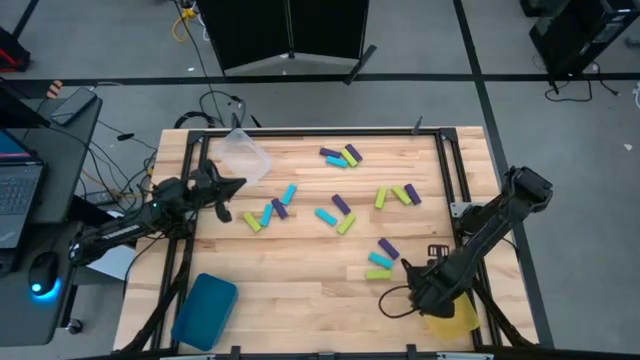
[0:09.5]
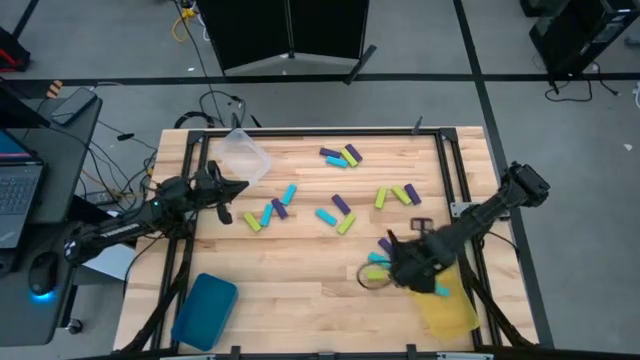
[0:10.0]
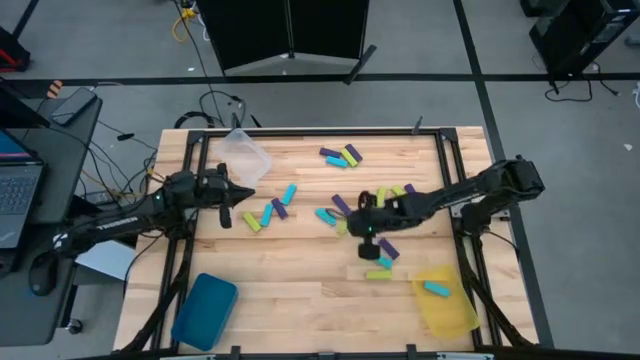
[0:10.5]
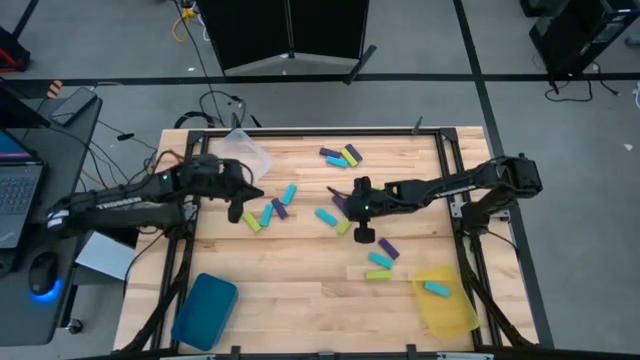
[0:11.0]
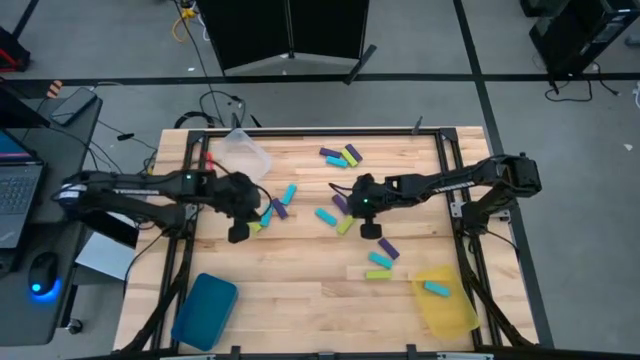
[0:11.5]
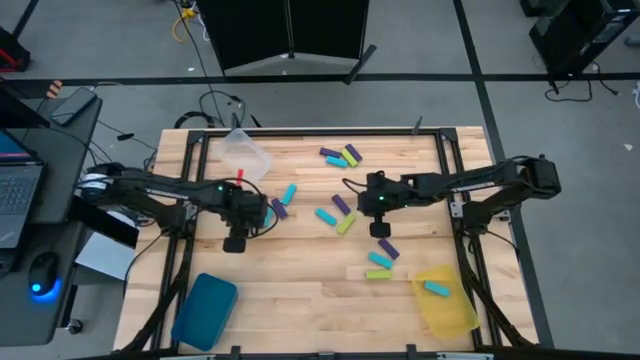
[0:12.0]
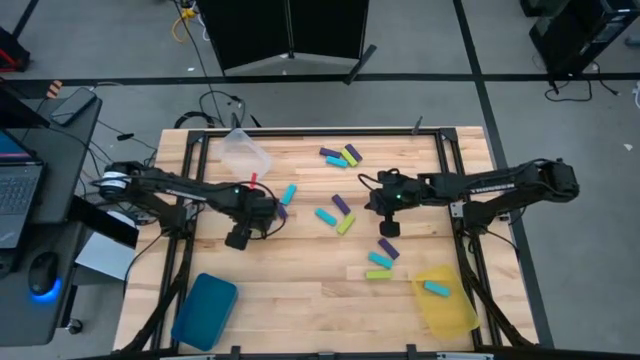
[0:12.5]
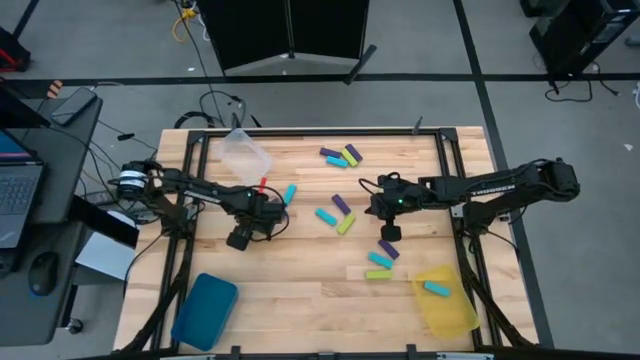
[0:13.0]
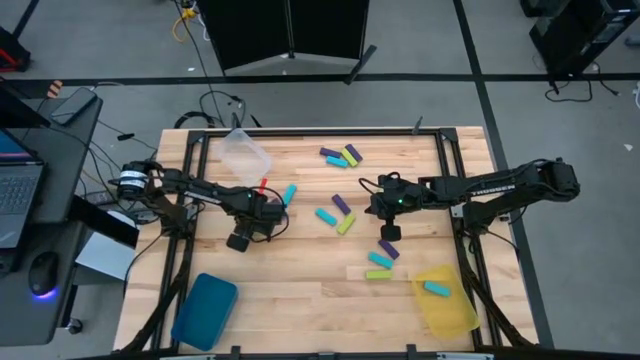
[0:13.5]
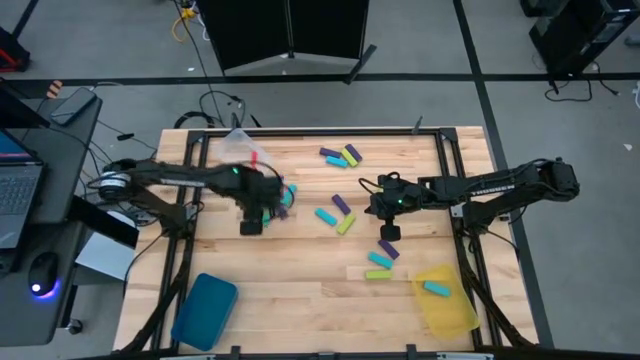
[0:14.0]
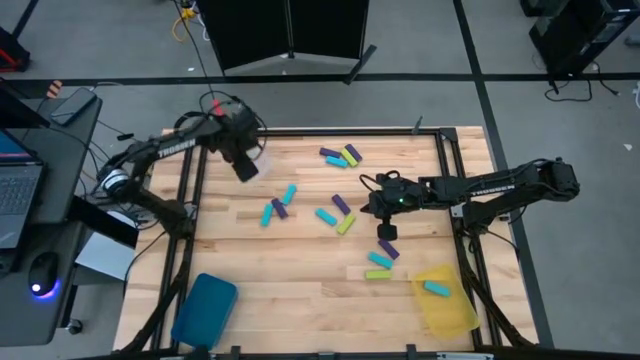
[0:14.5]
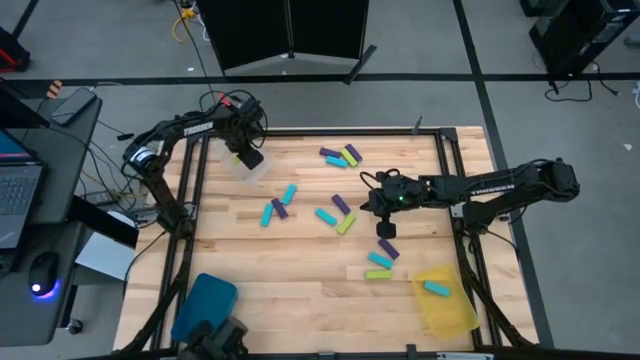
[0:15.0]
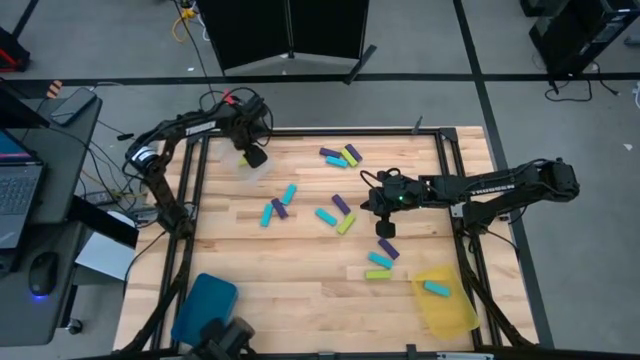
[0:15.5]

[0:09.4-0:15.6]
Task: Sort blocks
Put the green block into the transparent bin

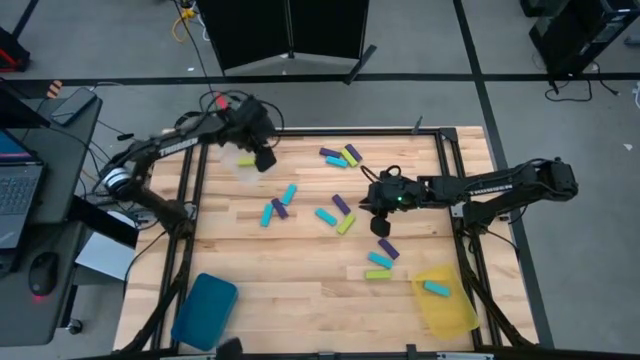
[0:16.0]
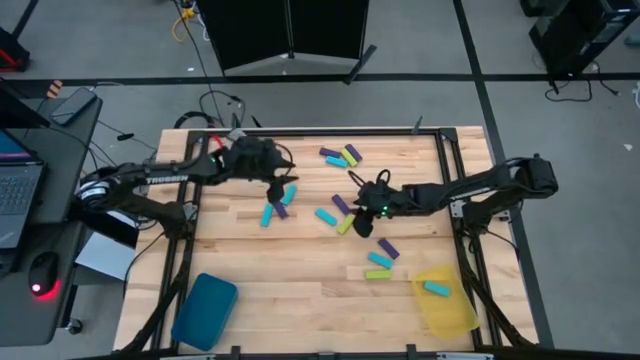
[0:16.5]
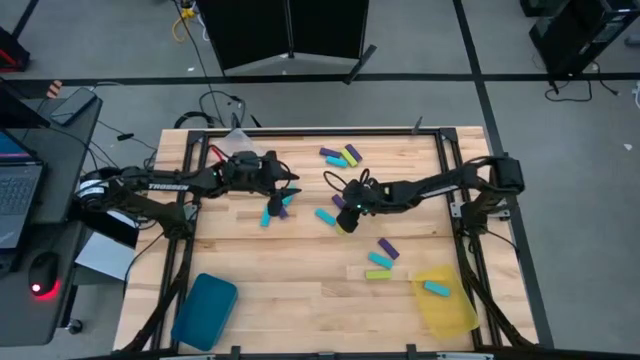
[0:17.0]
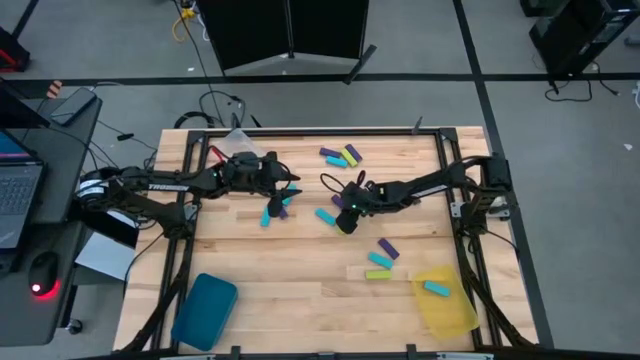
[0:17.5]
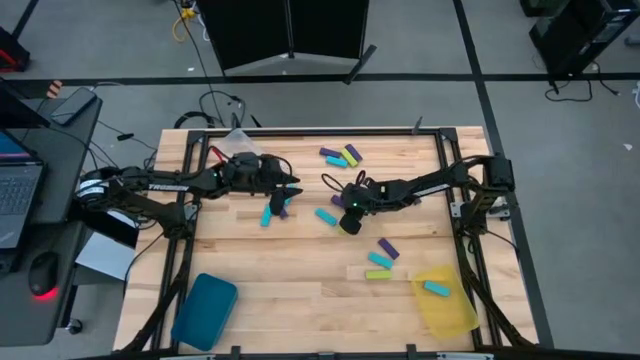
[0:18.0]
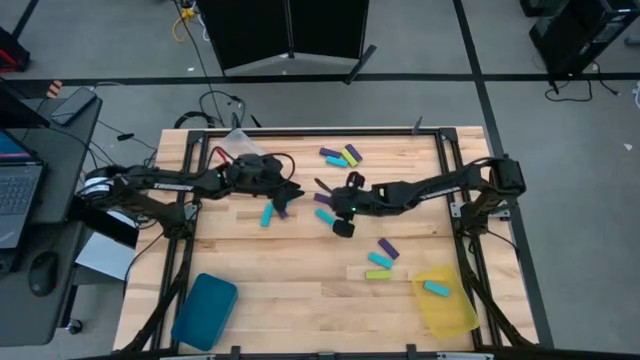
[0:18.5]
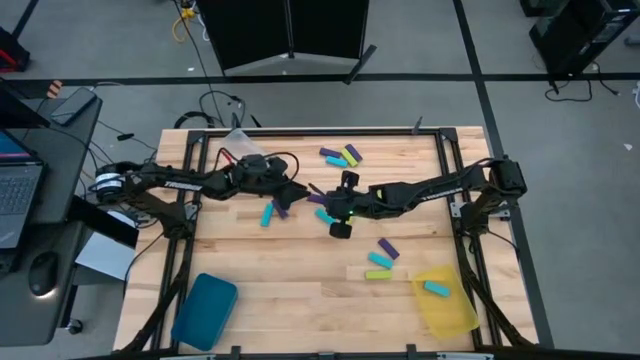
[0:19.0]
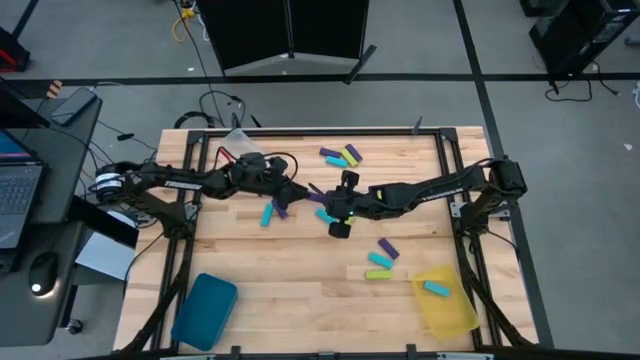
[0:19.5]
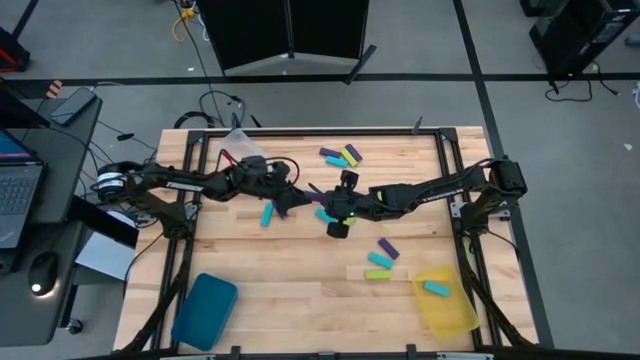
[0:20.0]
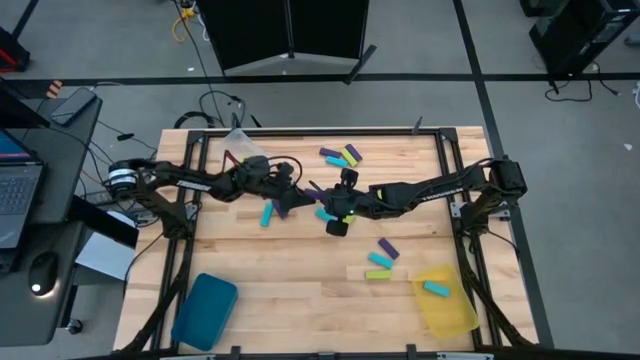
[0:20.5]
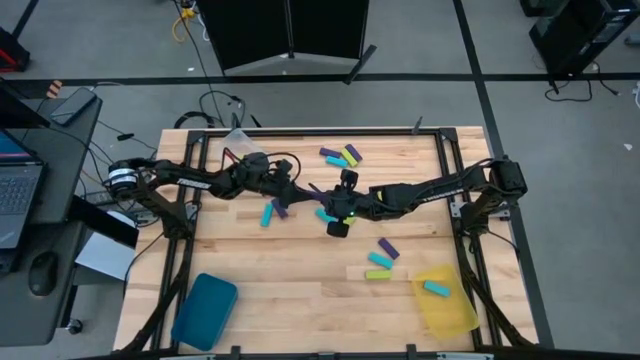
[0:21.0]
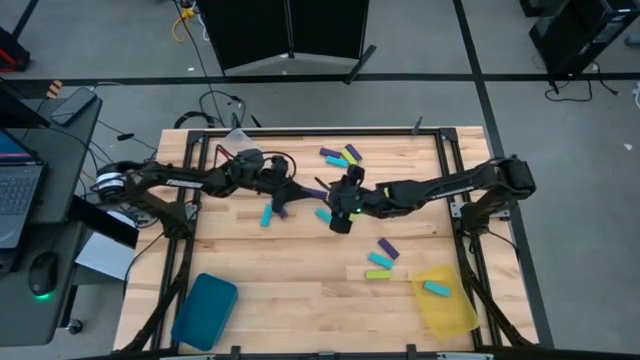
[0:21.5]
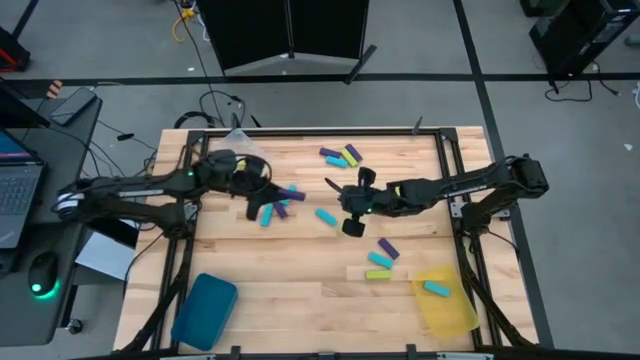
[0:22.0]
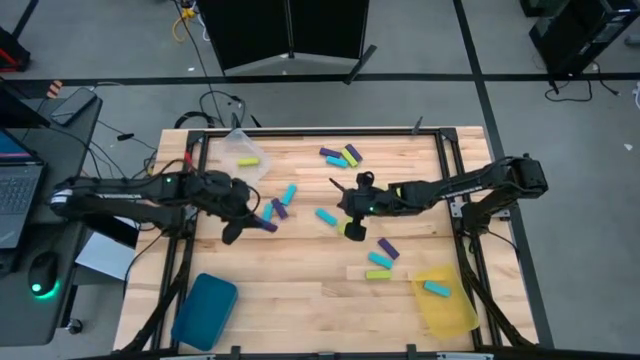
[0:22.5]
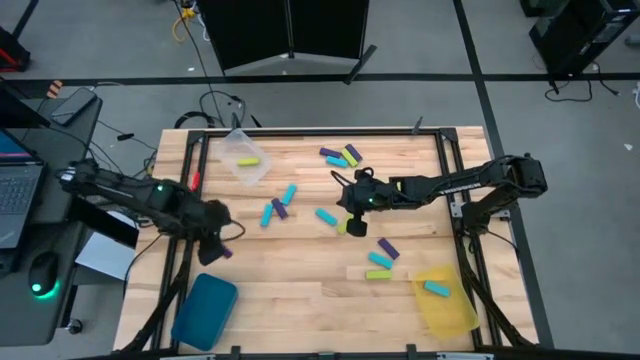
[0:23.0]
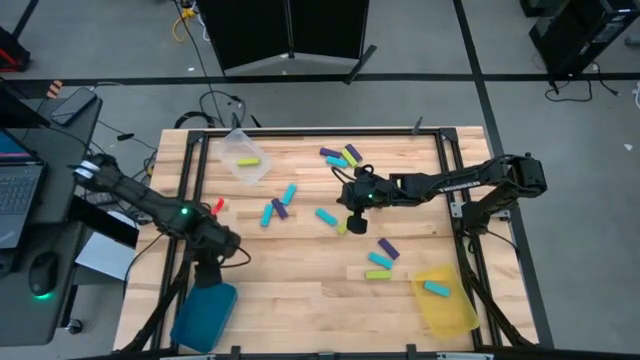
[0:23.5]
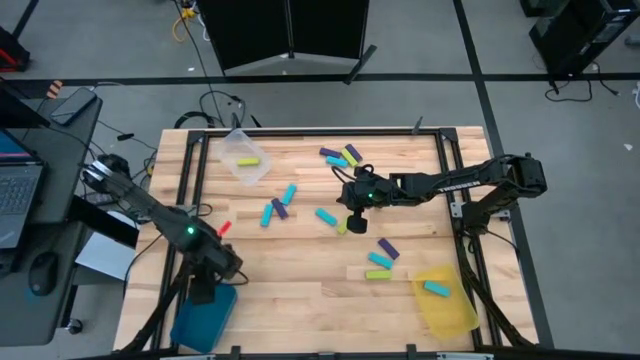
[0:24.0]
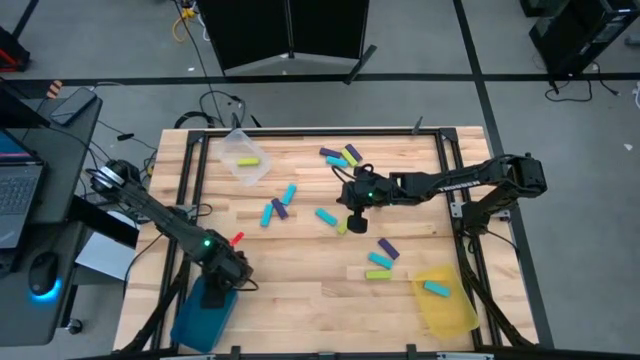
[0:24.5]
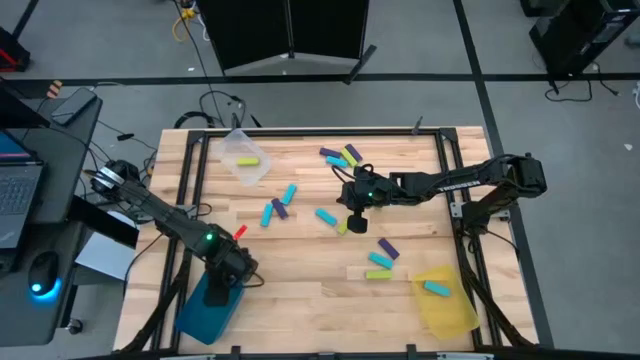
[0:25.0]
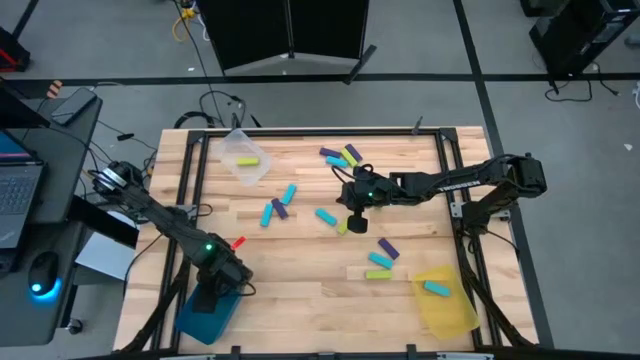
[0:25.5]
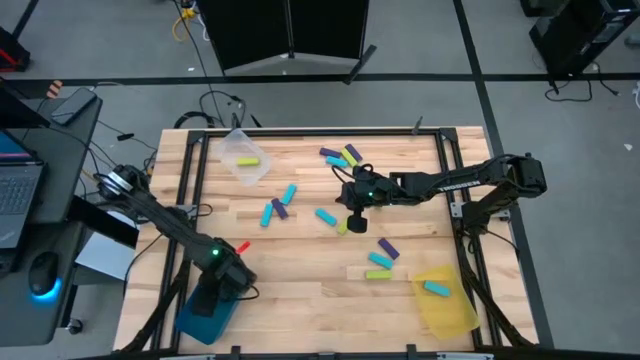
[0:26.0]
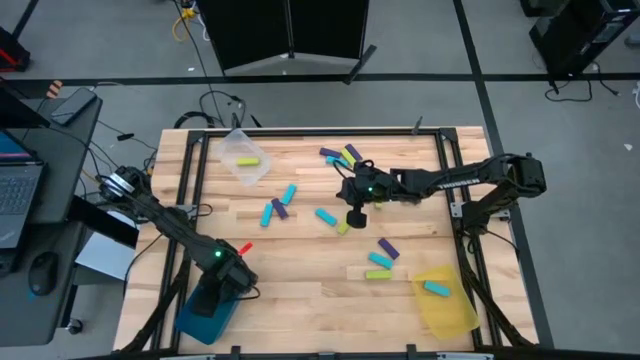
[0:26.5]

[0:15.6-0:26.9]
Put the purple block into the blue bin

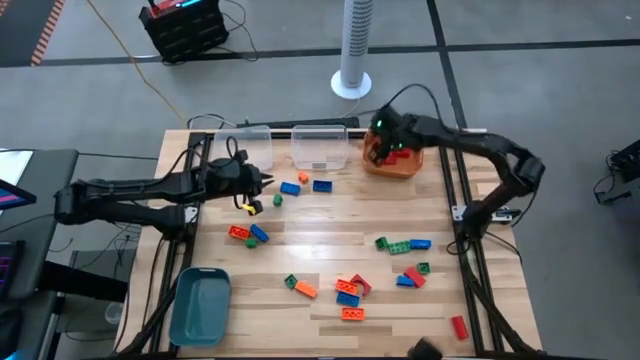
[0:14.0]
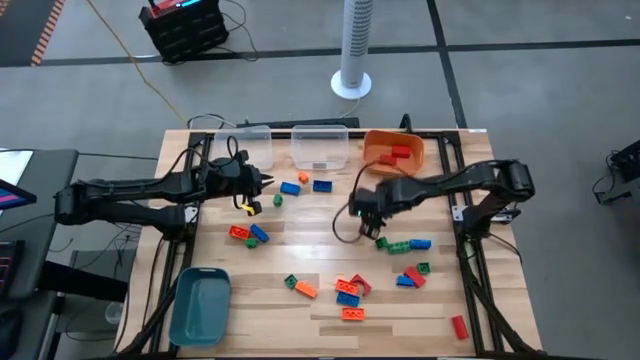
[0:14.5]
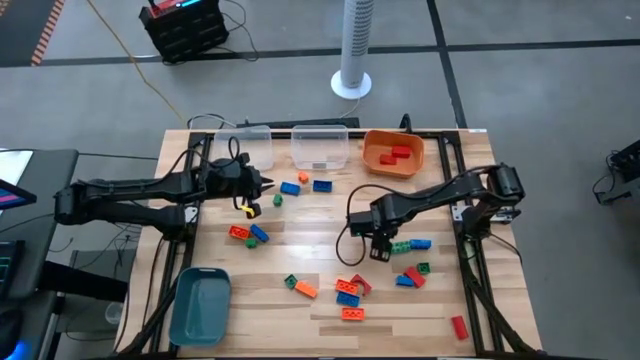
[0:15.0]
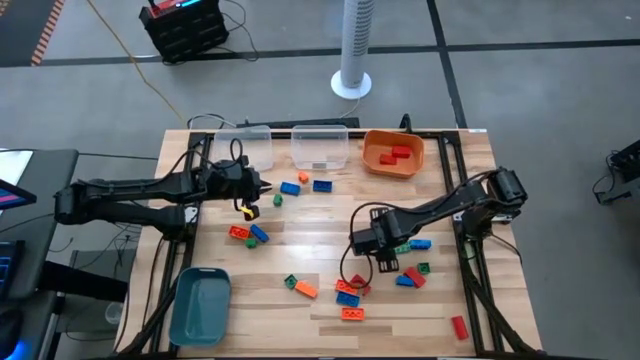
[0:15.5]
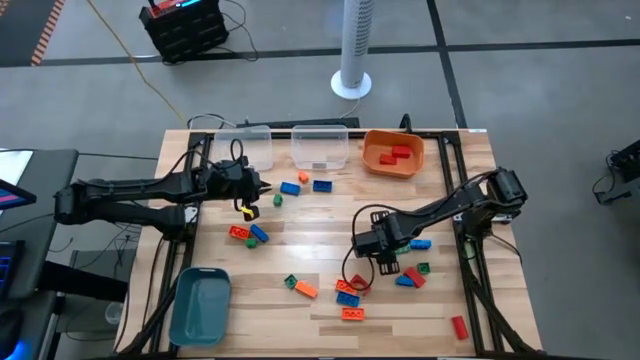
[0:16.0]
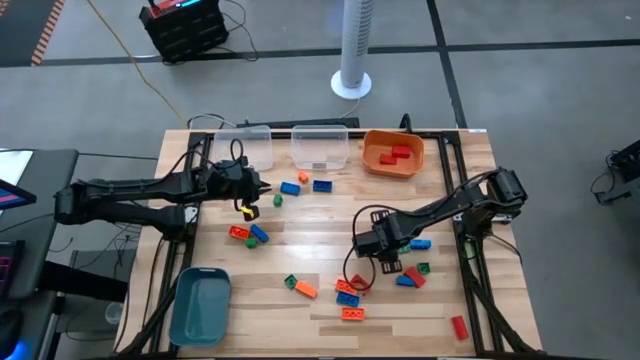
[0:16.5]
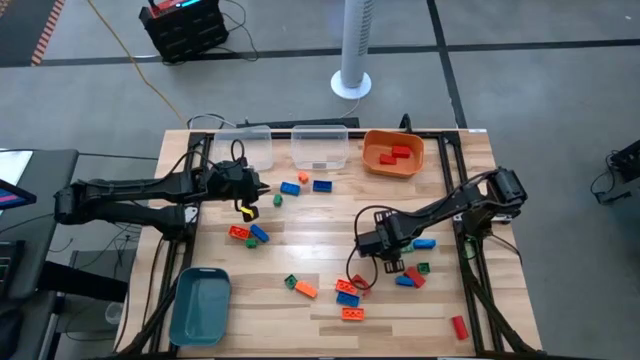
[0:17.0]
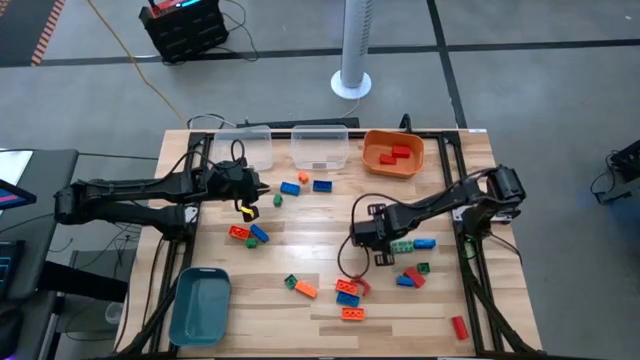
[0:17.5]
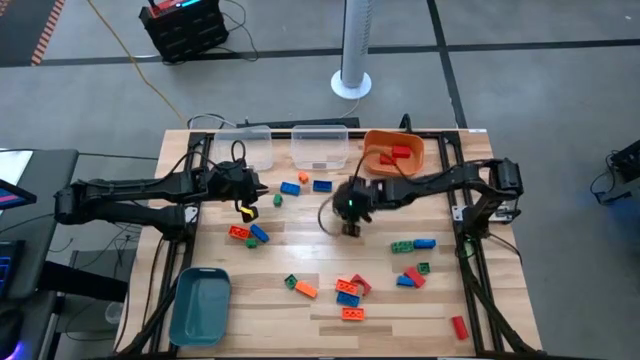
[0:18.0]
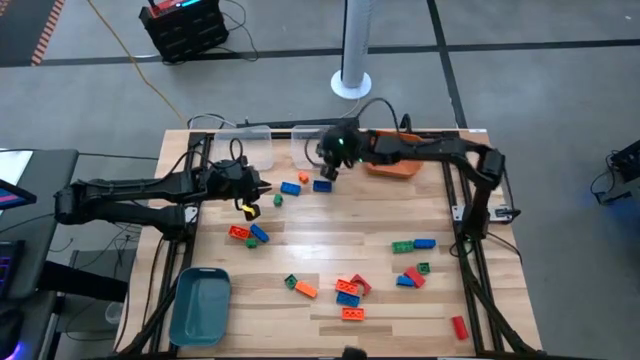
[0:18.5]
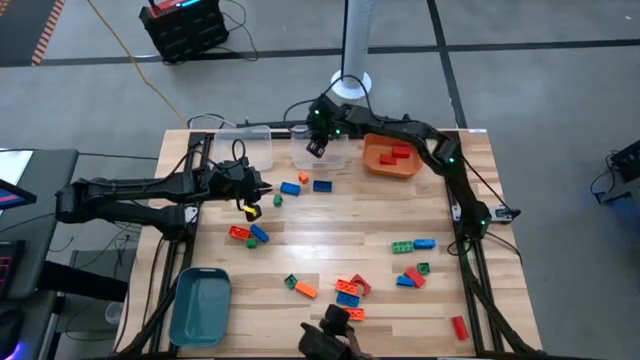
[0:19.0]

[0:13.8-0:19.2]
Task: Sort blocks
Put the green game piece into the right transparent bin
